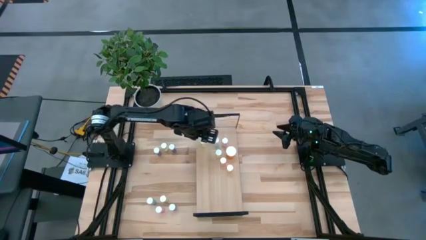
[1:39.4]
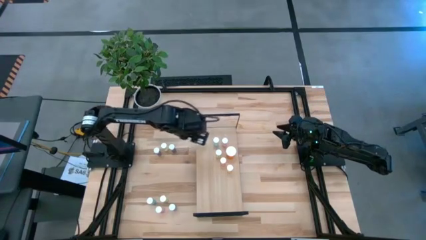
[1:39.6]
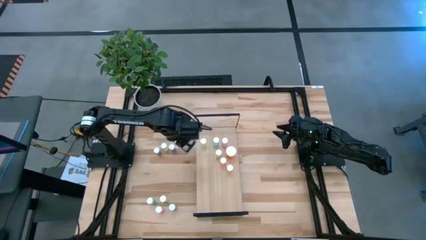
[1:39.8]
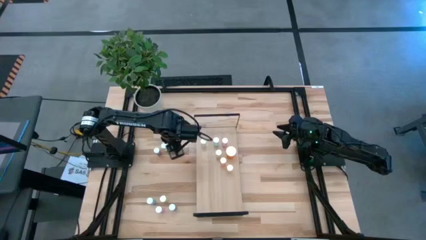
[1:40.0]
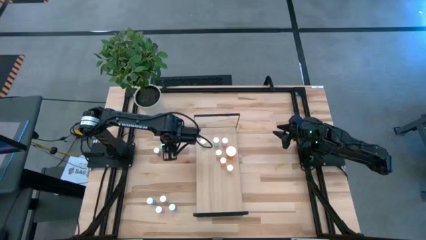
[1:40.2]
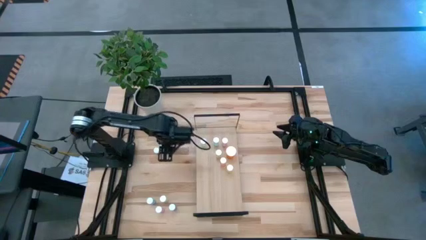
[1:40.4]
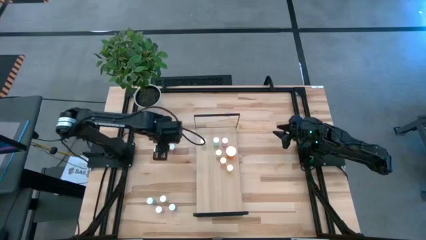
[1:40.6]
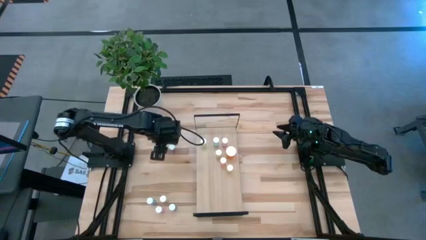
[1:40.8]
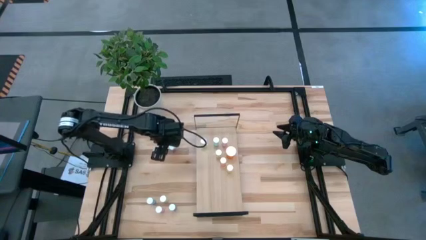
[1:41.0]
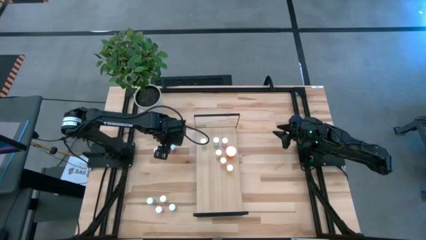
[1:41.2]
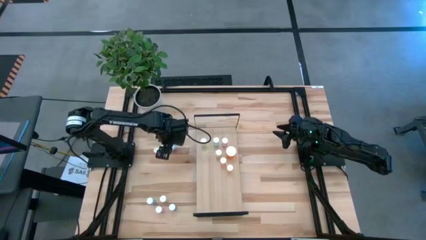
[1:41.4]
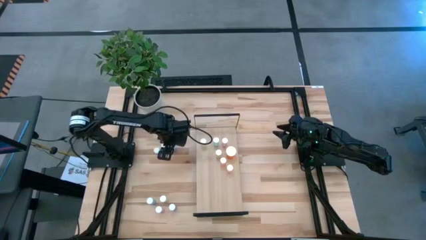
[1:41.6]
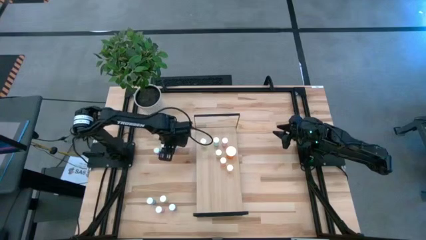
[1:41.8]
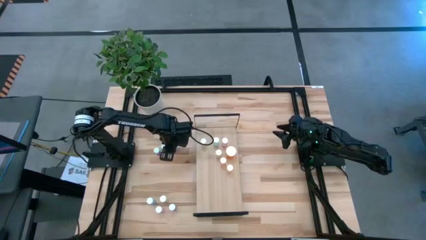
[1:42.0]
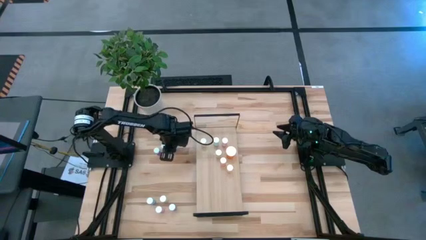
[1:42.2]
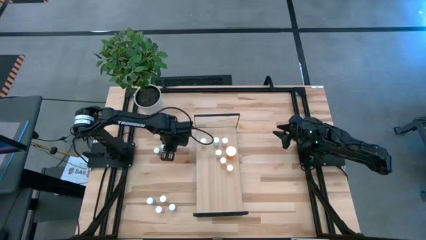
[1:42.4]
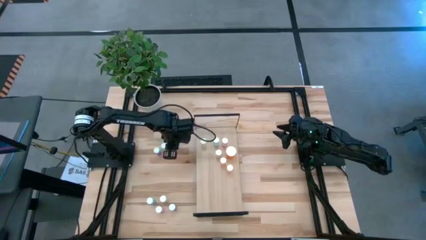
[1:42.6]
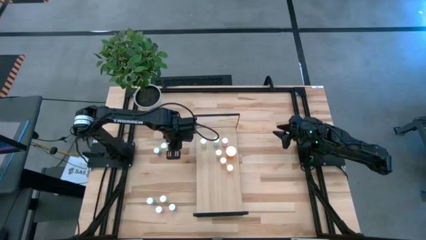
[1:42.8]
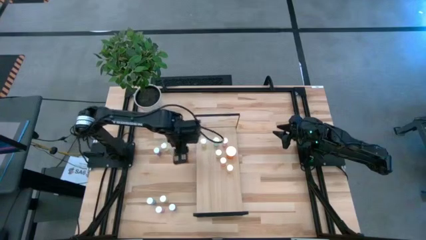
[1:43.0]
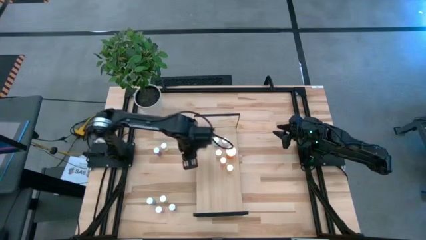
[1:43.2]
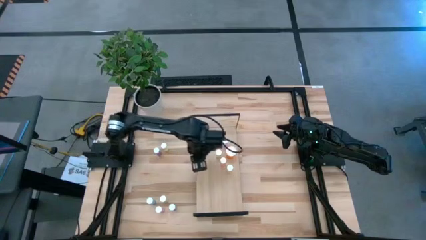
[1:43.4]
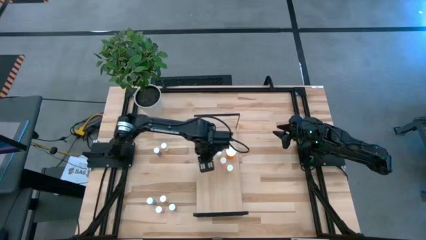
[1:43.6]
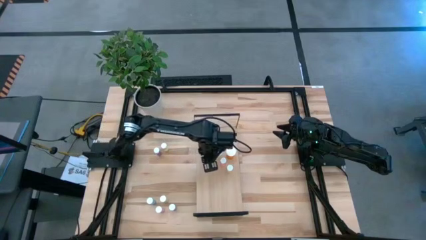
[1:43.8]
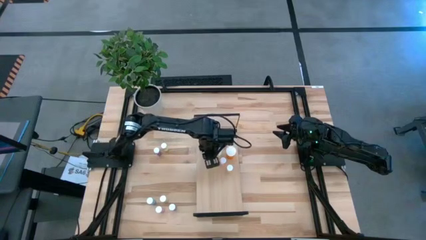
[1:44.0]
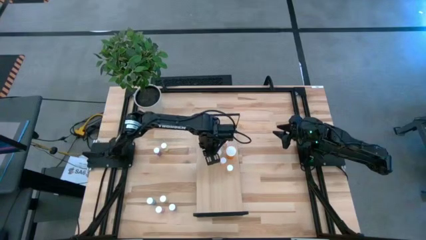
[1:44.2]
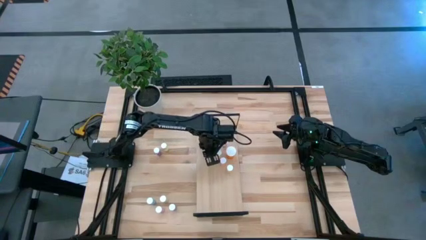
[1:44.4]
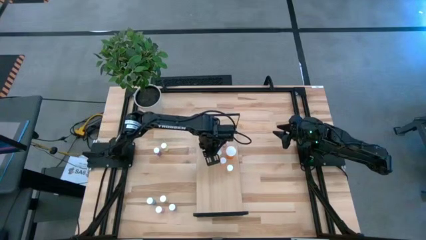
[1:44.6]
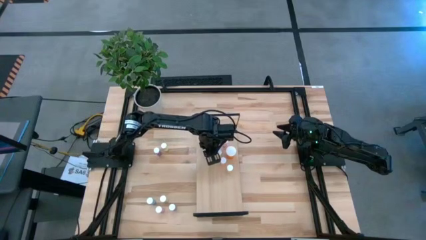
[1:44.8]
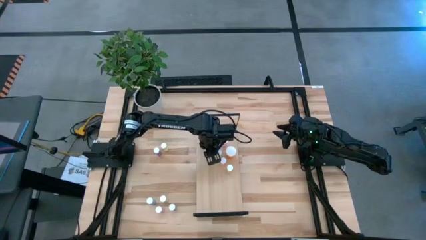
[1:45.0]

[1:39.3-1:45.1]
Task: Pick and place medicine bottles onto shelf by color
Put the blue pill bottle on the shelf

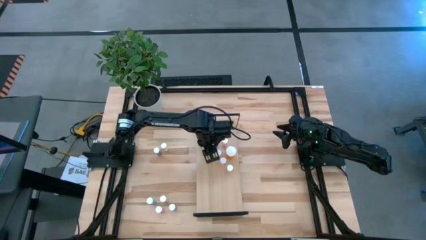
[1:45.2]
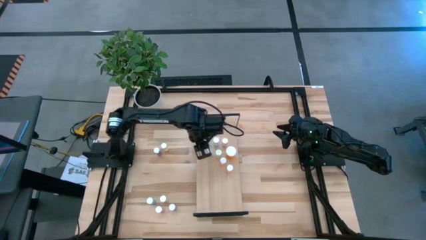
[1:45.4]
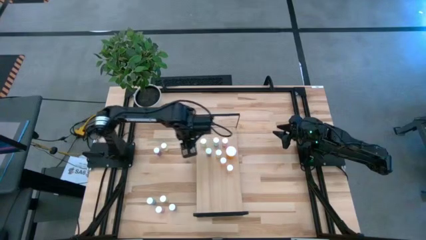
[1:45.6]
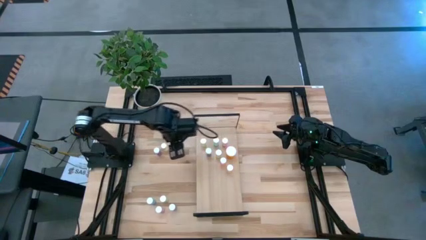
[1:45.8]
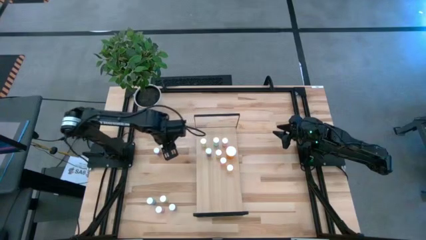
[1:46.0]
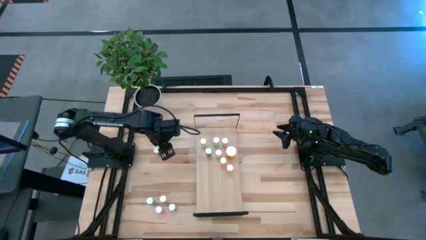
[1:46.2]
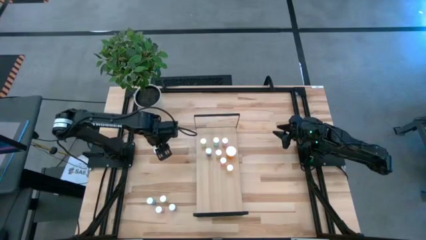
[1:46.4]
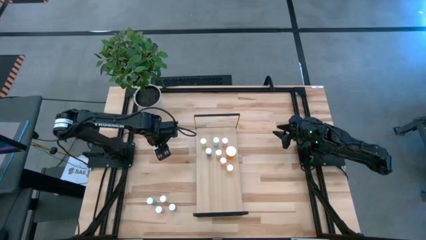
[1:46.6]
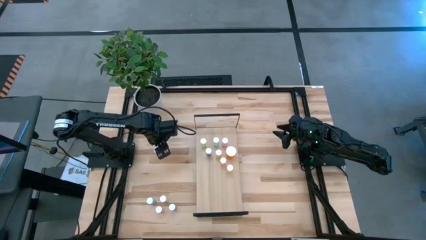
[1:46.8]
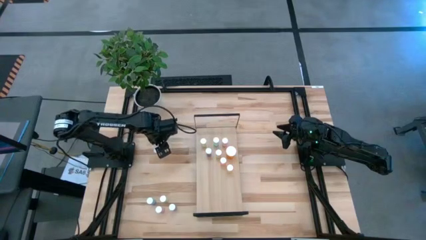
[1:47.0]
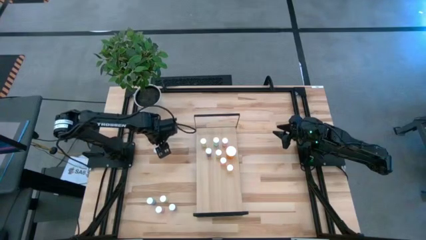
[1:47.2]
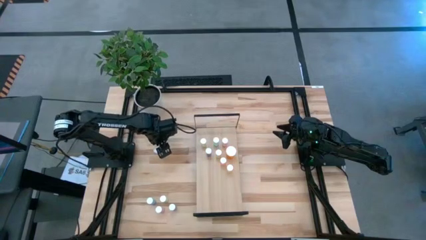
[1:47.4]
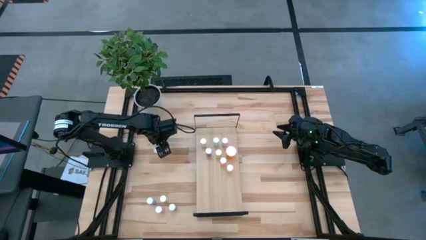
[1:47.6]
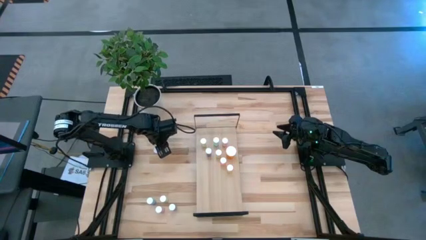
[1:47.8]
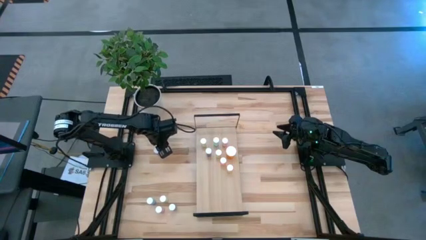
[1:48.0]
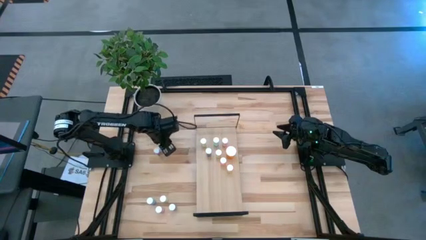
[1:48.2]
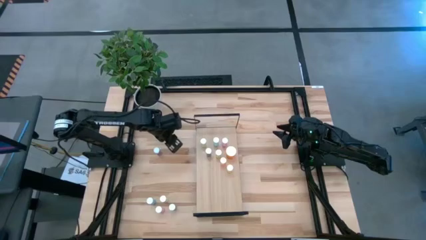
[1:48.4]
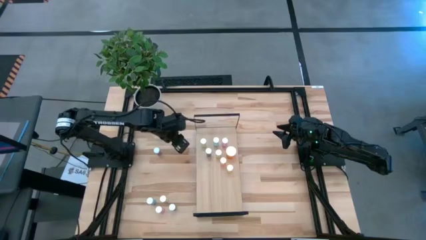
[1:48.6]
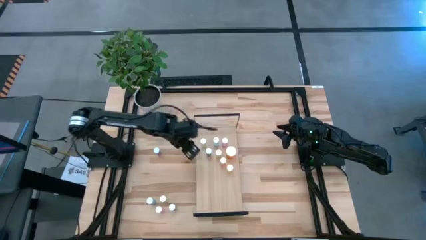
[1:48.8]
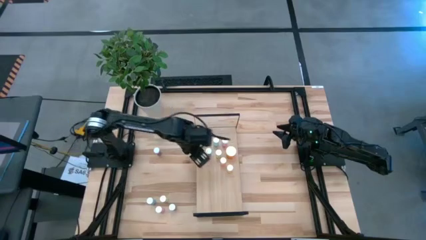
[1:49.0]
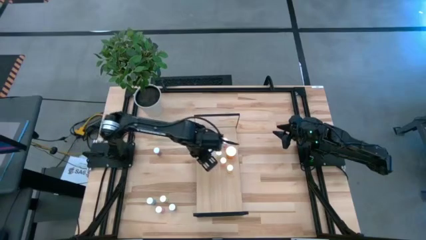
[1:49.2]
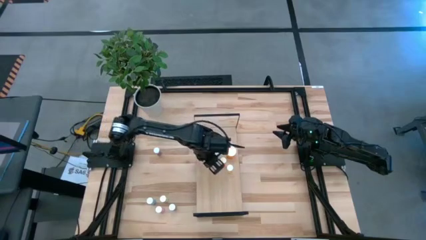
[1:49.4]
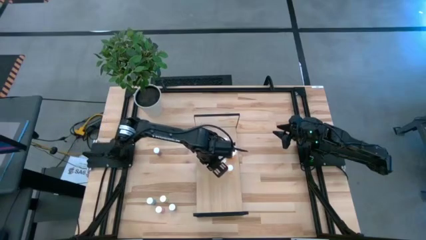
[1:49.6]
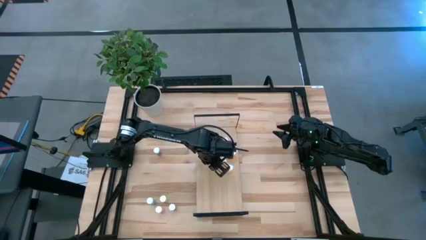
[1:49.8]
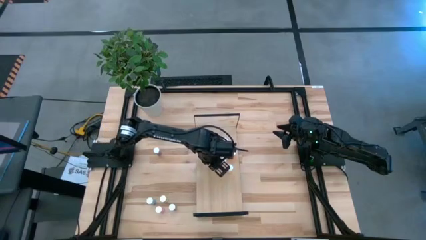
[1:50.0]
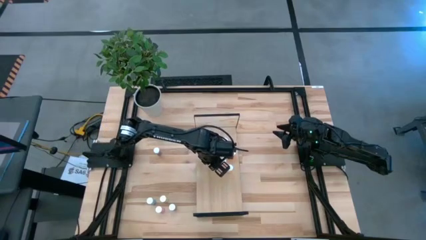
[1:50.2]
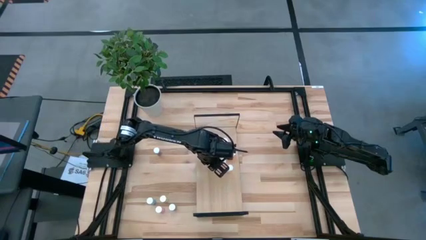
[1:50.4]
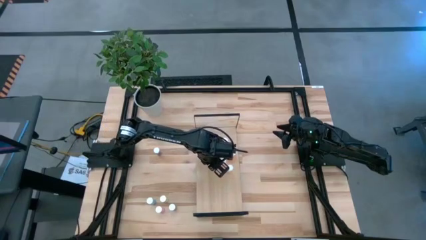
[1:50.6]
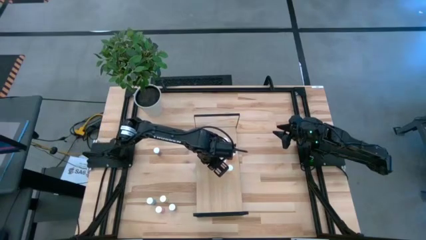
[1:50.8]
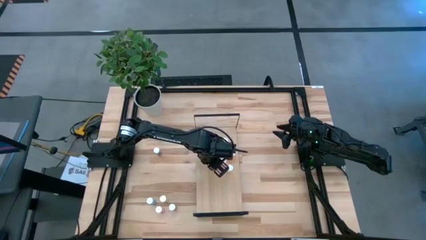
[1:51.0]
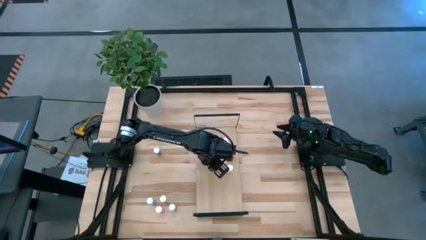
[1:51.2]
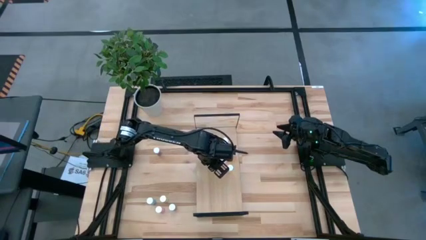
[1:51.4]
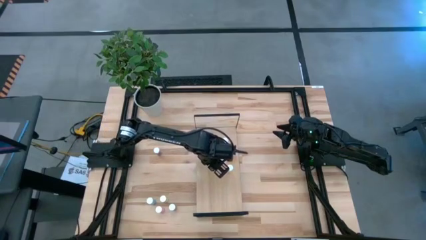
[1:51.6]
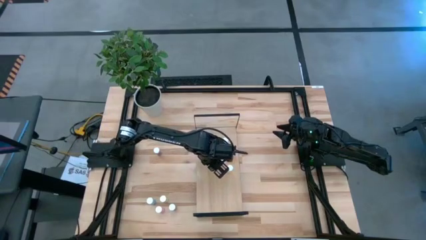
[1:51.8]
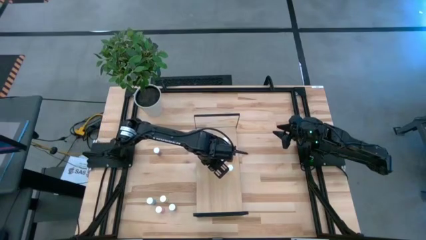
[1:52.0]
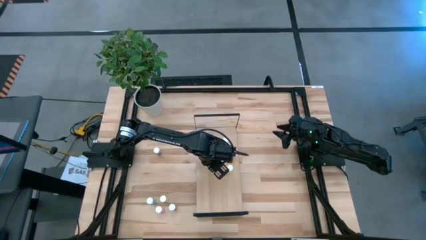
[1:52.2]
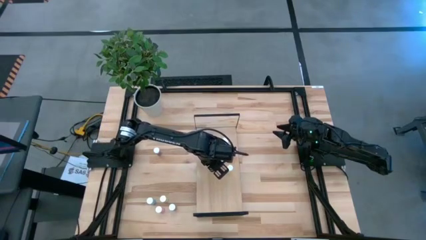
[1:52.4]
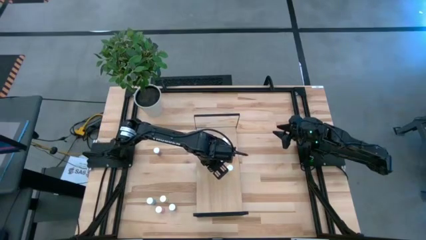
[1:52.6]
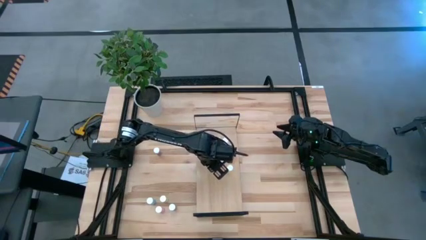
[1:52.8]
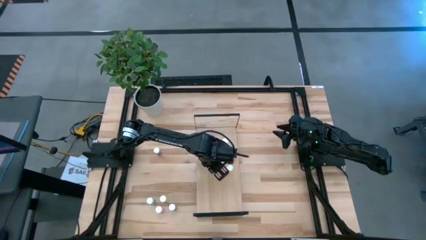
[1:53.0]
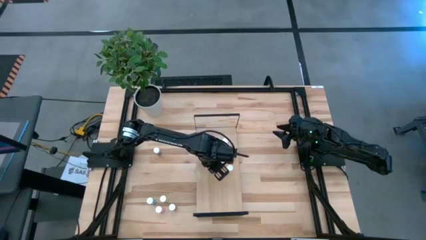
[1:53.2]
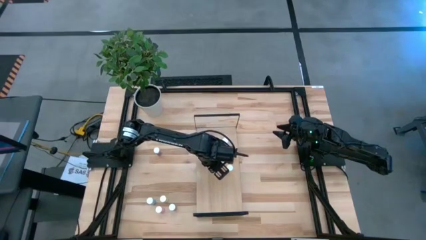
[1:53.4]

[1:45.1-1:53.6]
Put the yellow pill bottle on the shelf

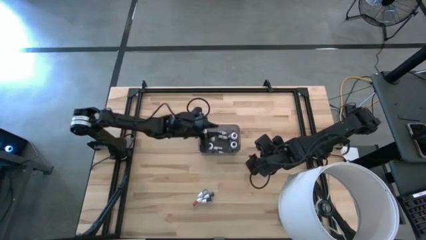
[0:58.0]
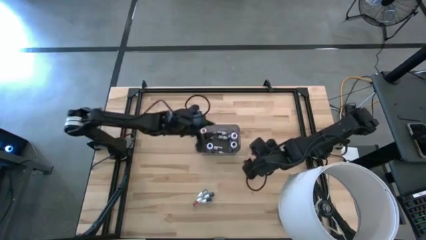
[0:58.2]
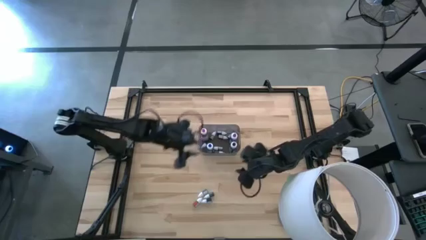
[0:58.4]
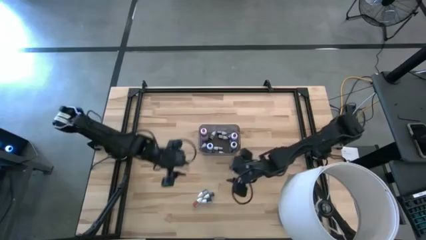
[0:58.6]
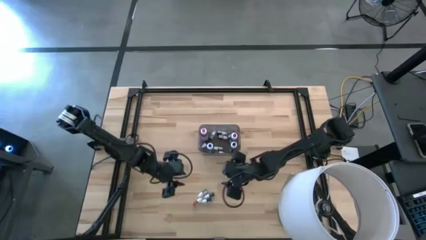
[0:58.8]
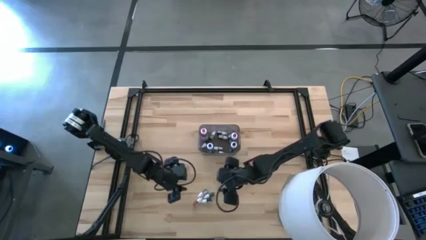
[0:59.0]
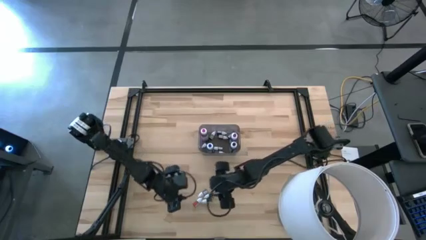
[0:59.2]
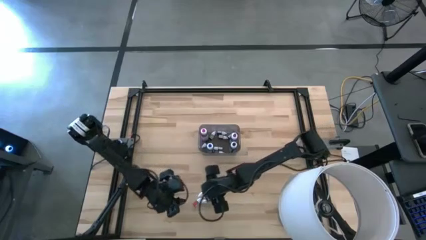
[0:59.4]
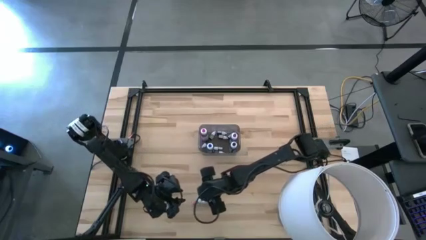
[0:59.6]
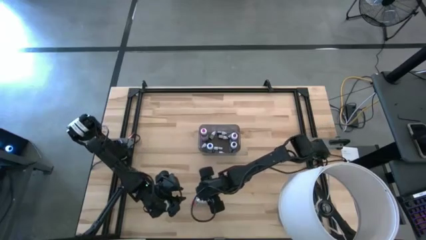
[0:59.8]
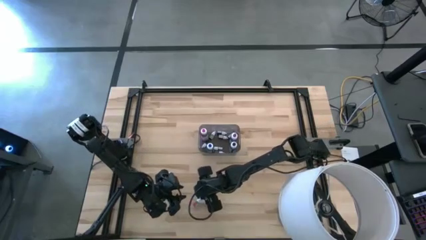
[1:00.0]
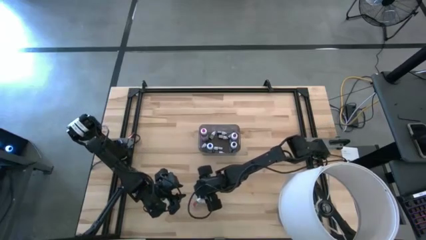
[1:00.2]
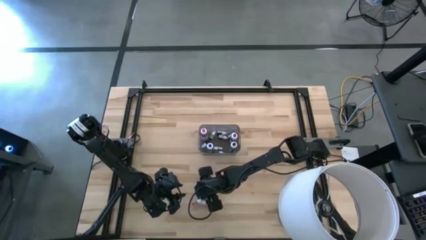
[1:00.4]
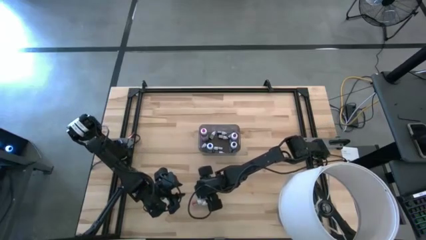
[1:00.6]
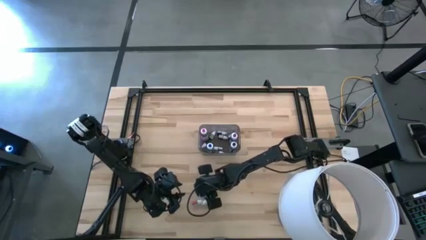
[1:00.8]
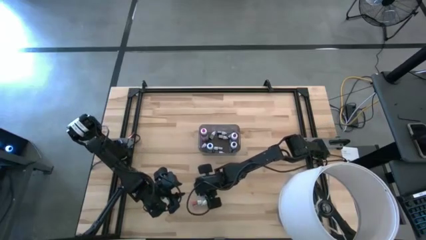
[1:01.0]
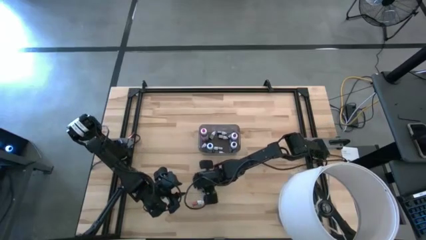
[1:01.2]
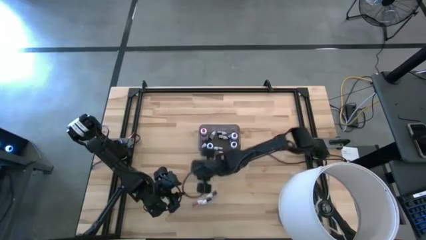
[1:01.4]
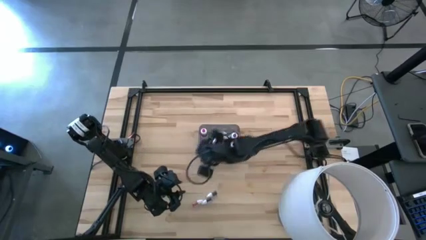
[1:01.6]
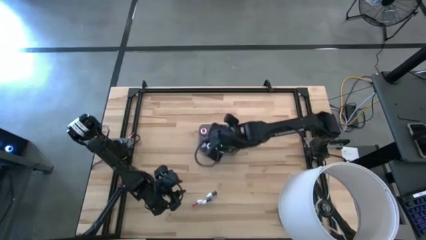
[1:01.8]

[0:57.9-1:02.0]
Task: Pick & Place food coloring
Put the small blue food coloring bottle in the black bin
